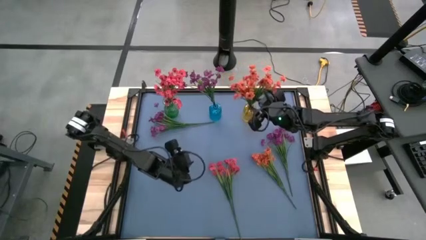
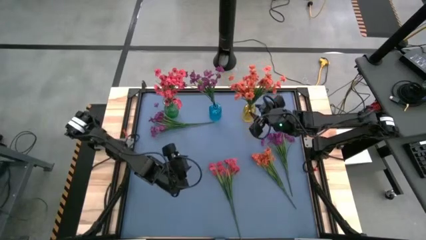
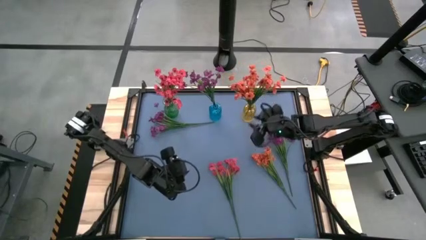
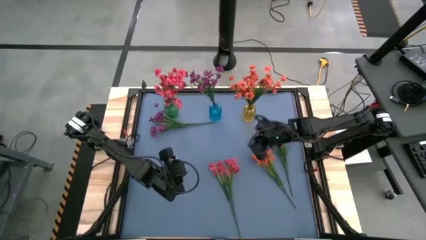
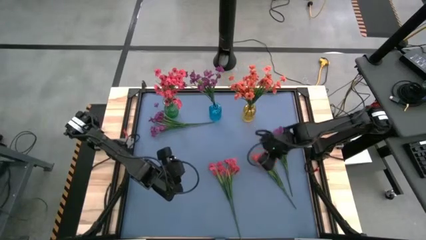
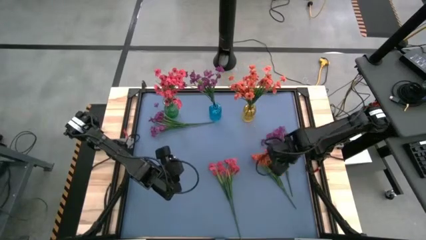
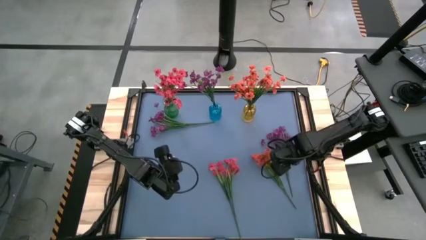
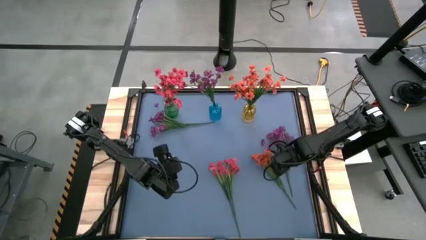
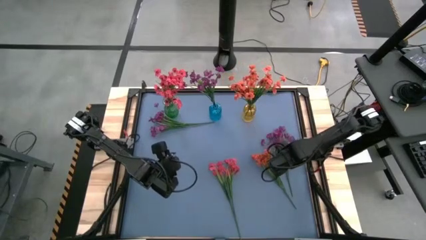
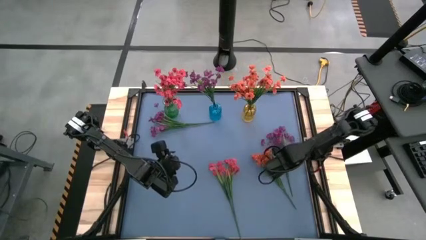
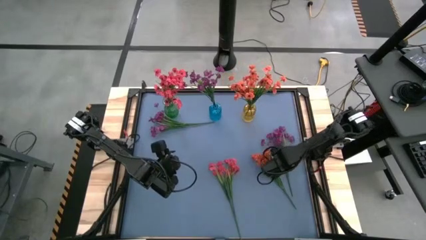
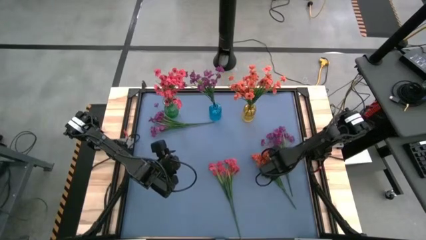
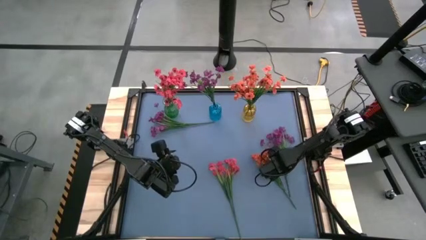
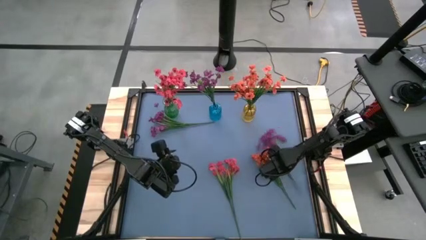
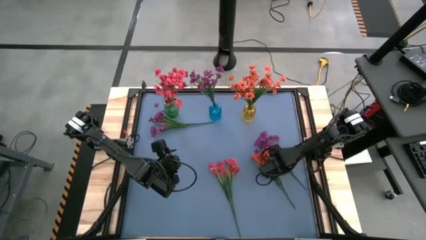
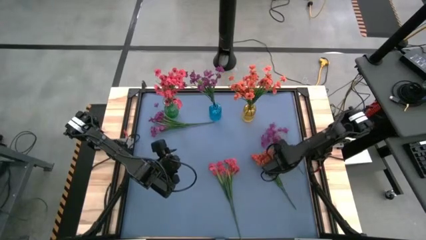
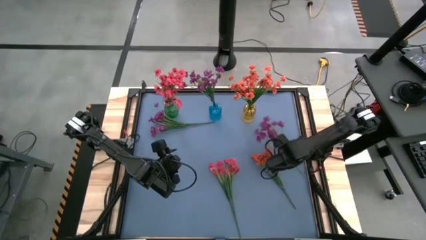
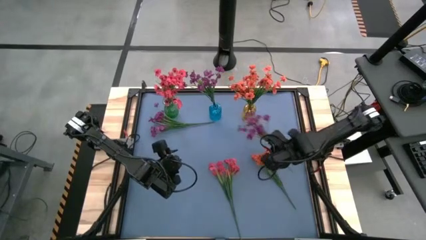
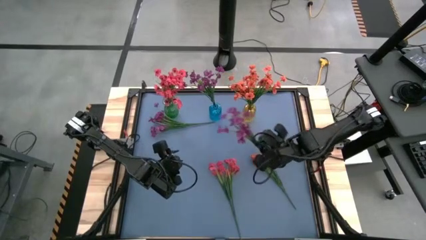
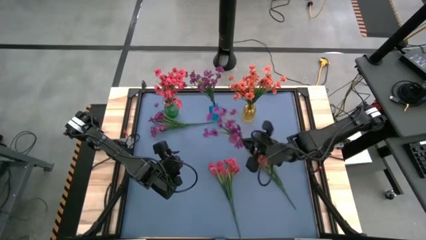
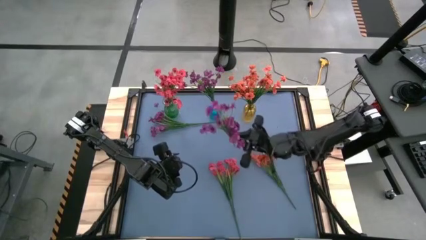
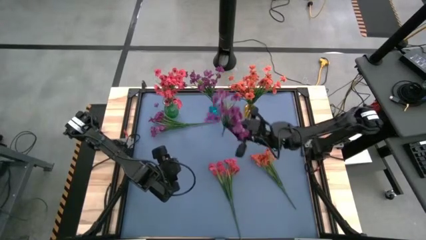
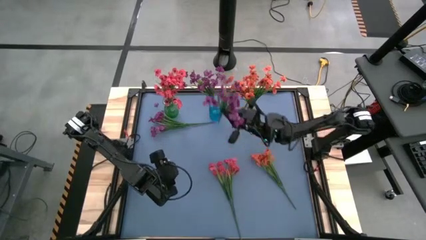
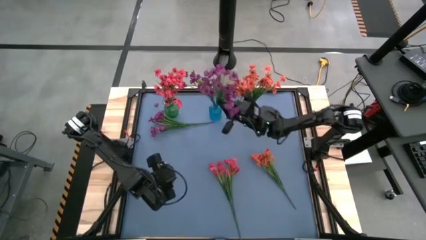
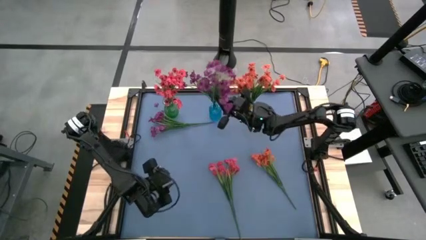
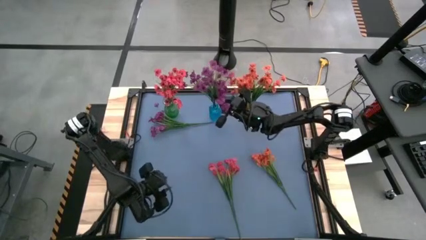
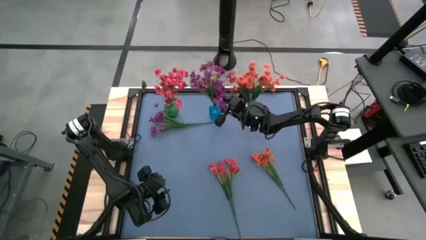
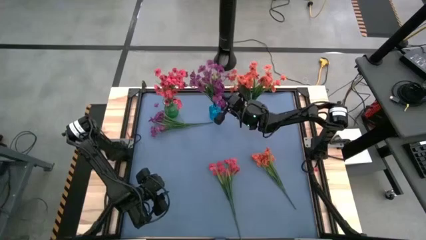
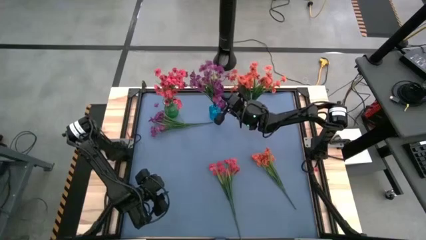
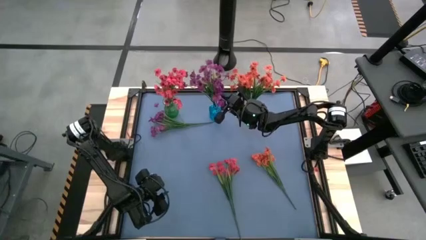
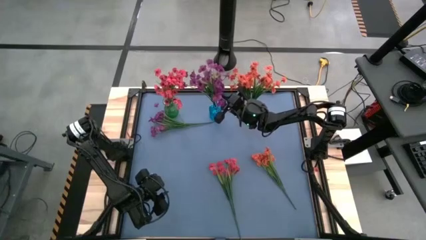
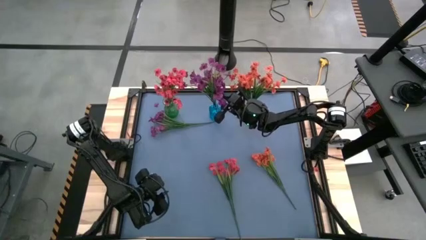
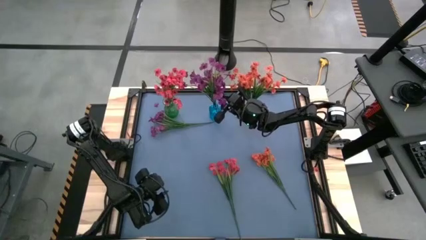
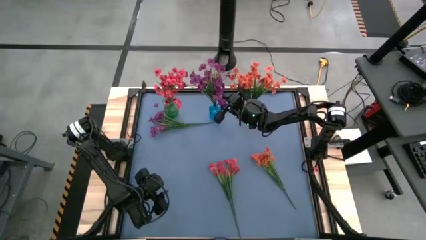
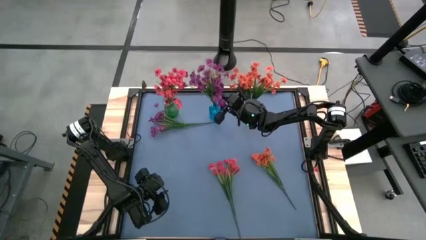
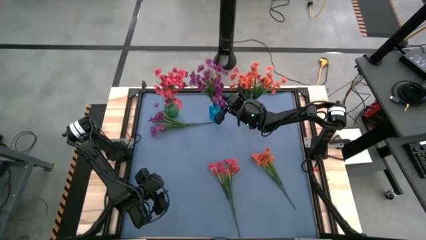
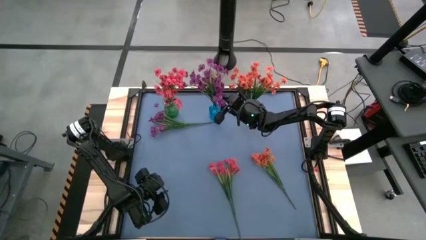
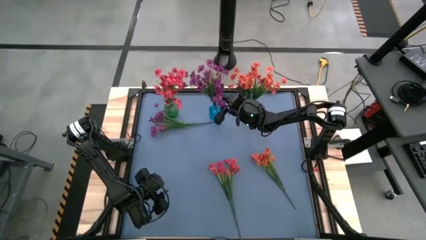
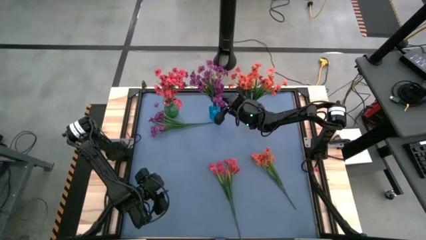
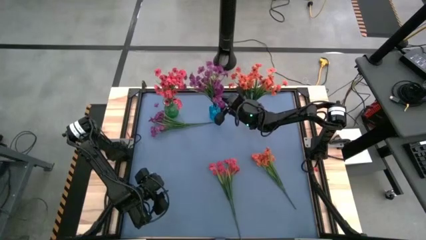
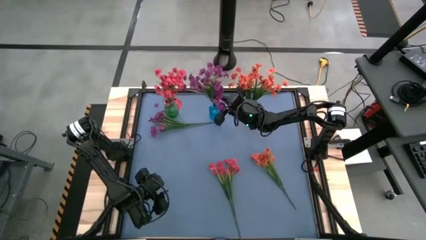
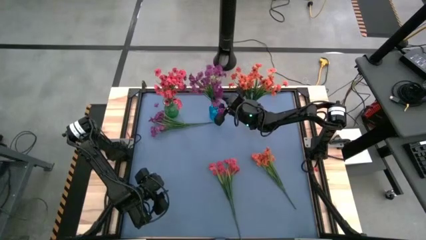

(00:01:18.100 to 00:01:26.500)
Task: Sort flowers into vase by color
Put the right violet flower into the blue vase

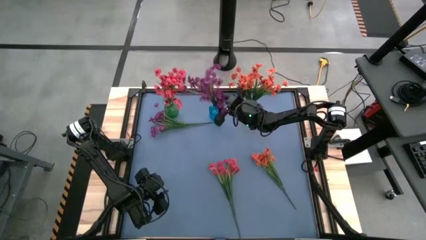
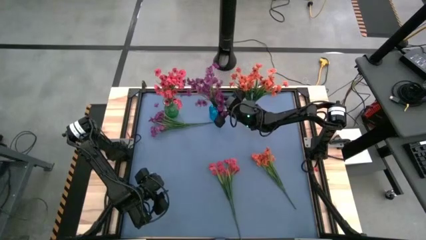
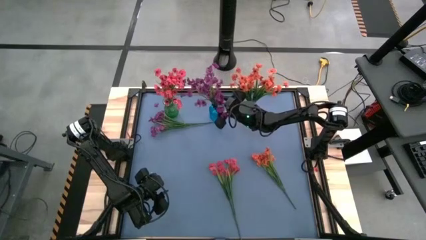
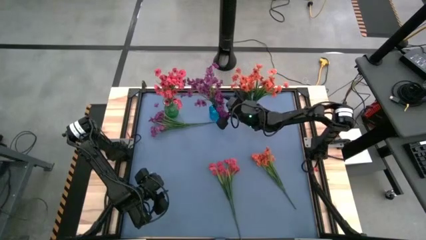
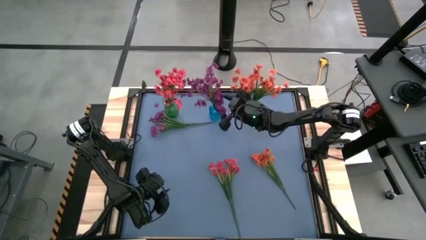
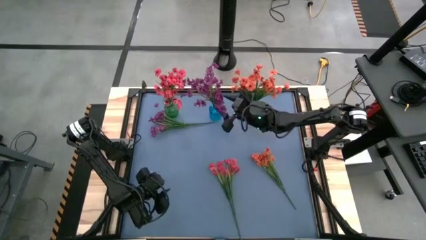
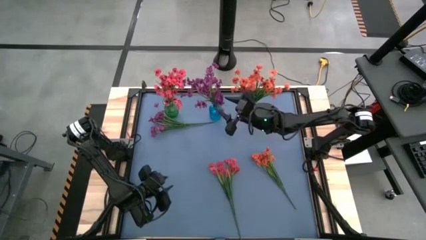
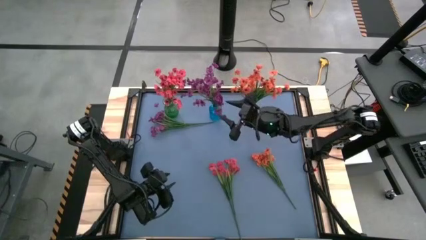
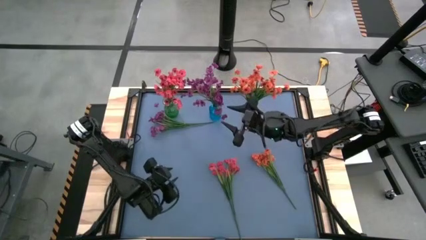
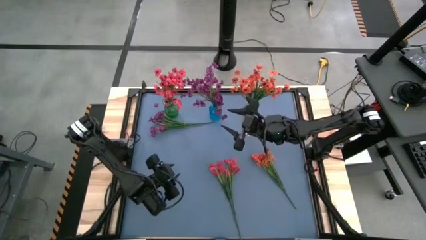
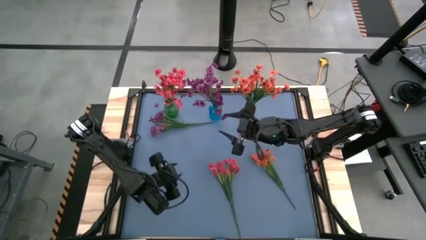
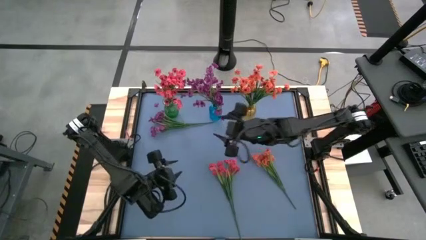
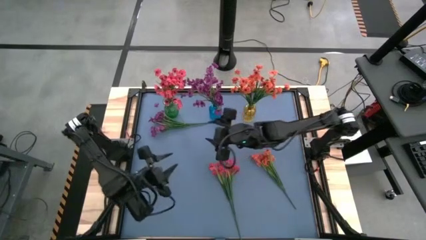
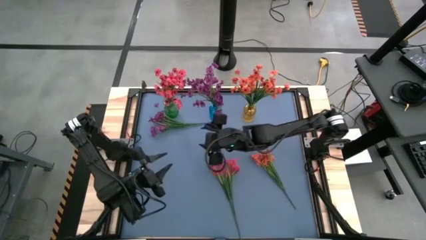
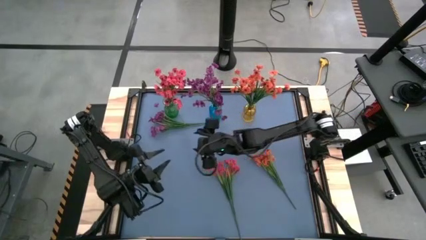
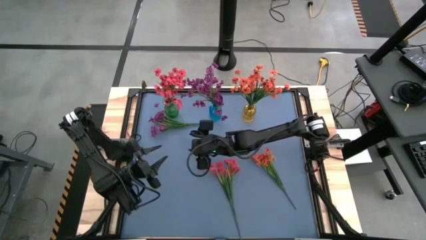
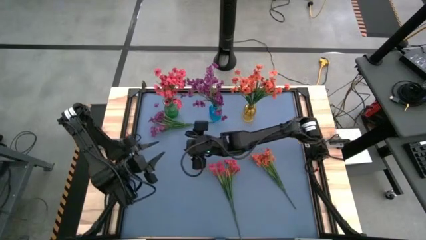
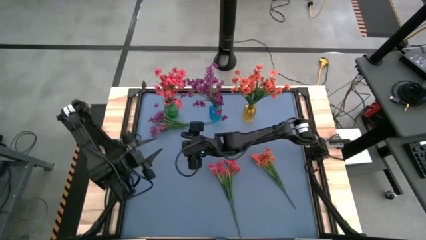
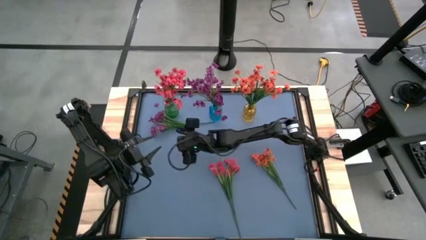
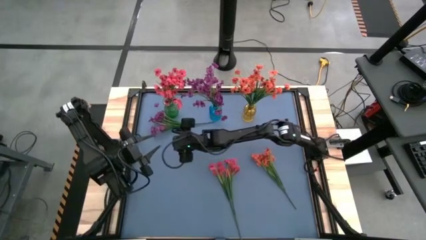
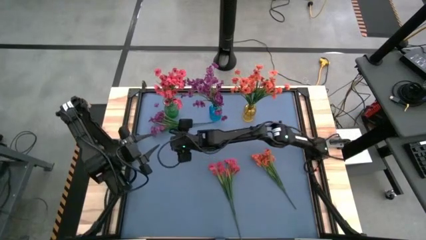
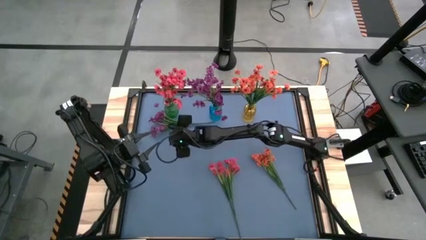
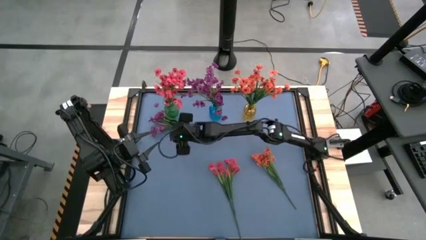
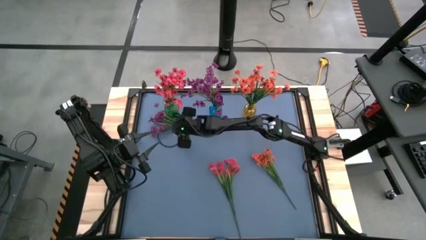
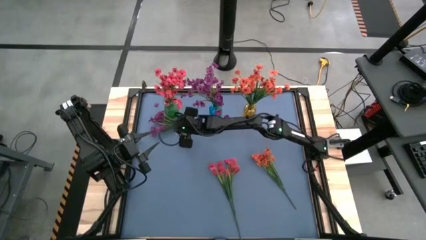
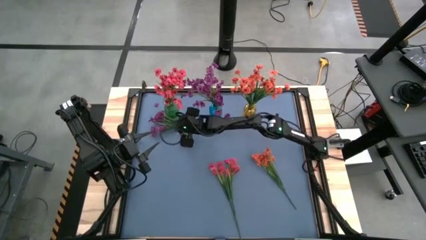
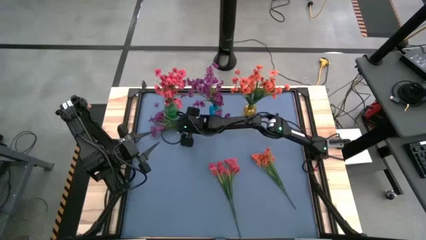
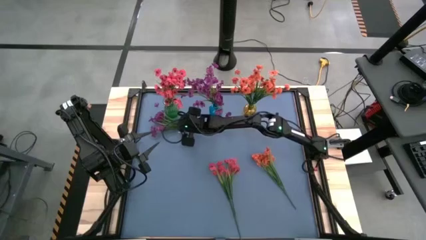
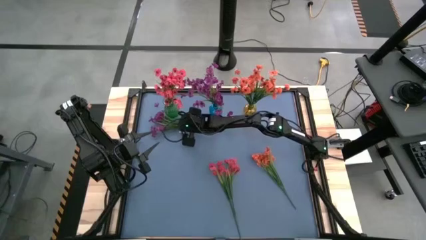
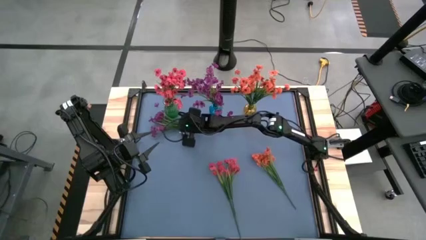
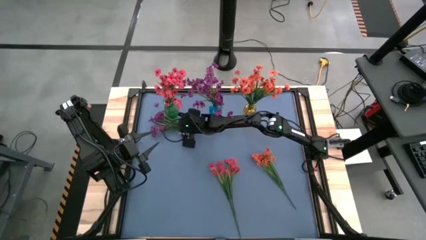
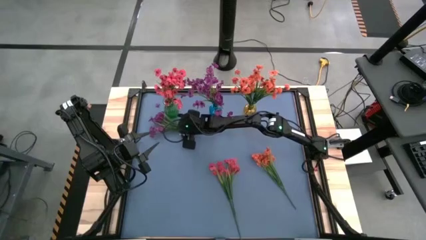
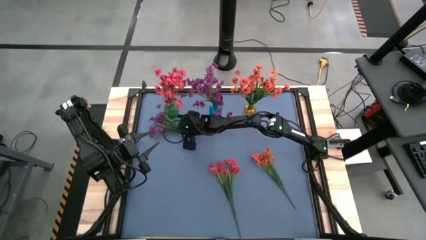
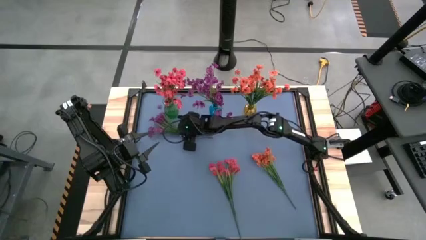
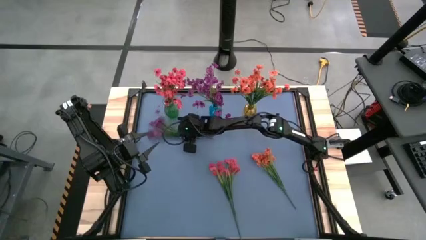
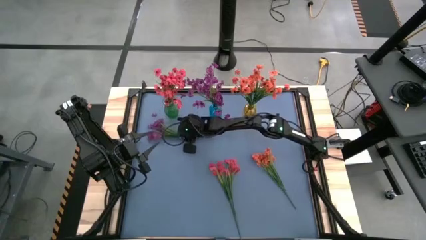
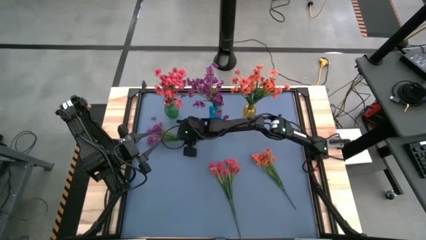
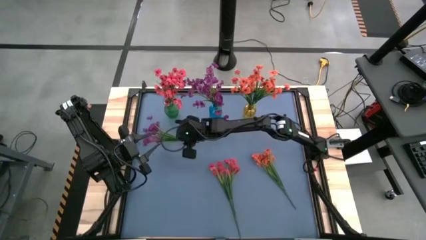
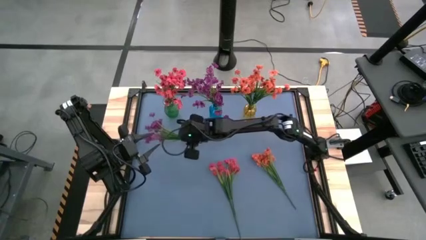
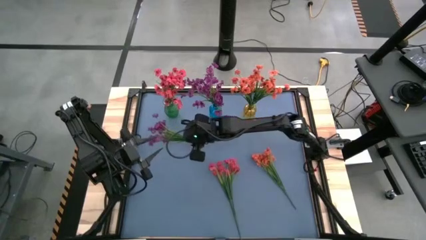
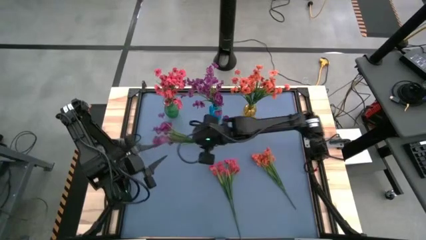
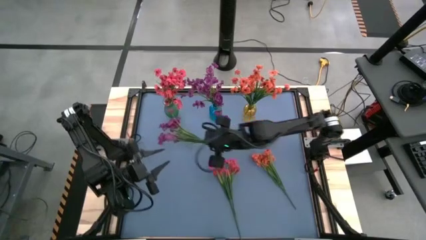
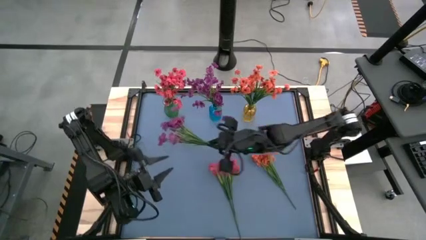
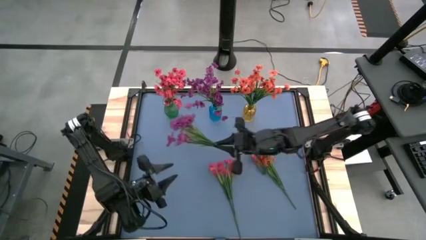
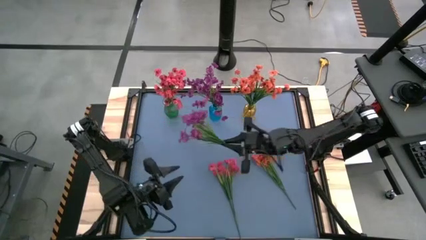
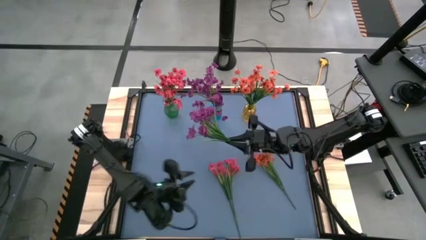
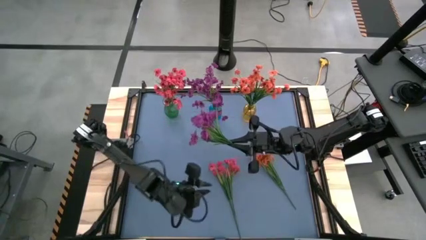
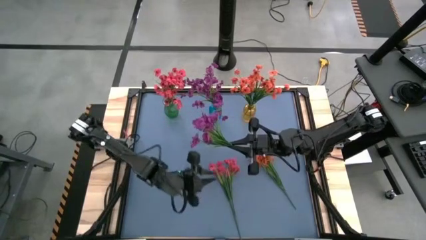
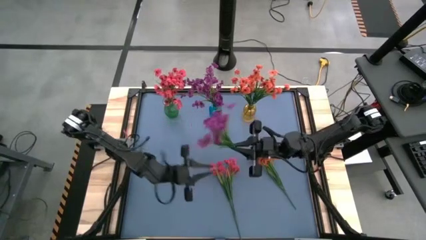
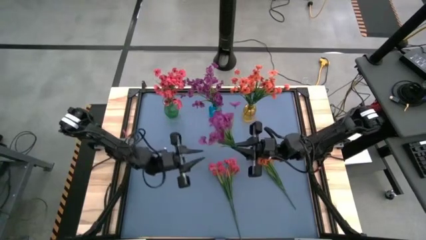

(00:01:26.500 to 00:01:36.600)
Put the violet flower into the blue vase
